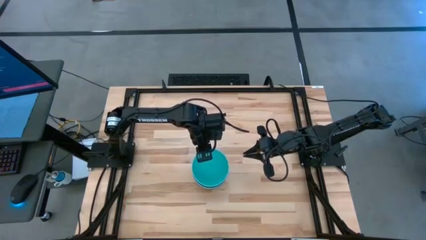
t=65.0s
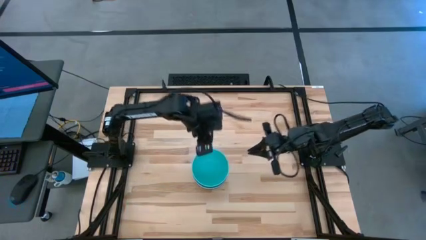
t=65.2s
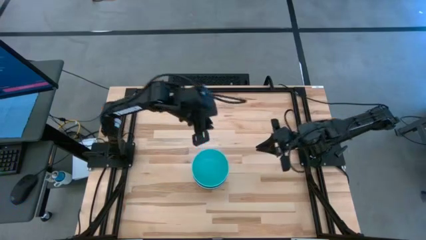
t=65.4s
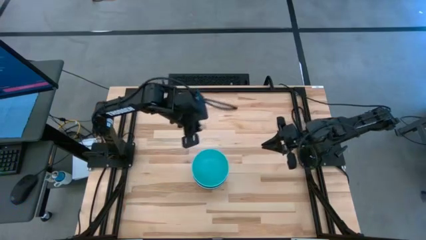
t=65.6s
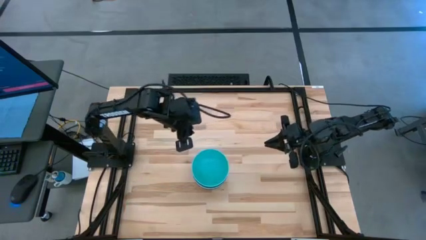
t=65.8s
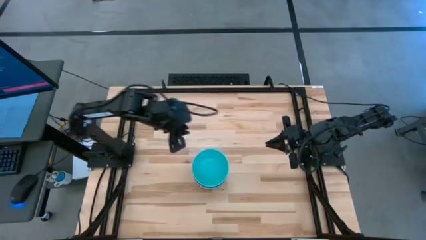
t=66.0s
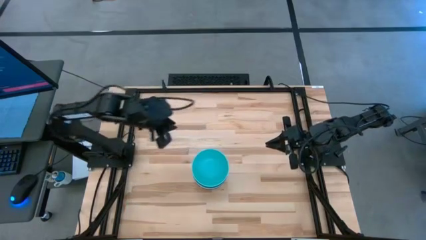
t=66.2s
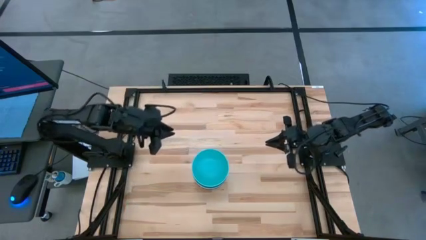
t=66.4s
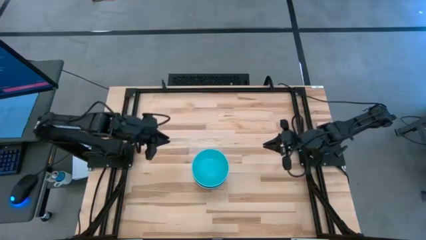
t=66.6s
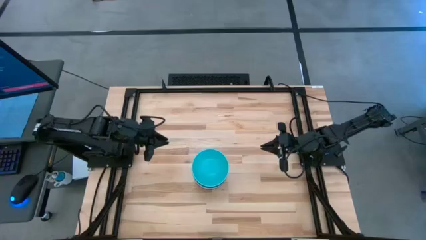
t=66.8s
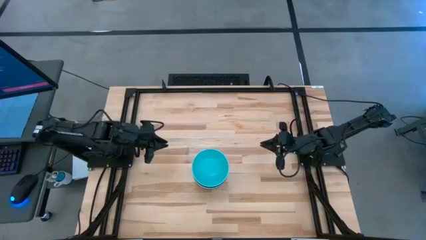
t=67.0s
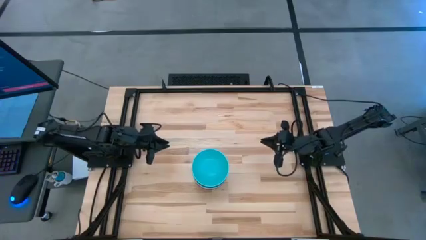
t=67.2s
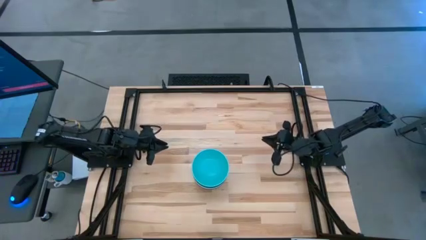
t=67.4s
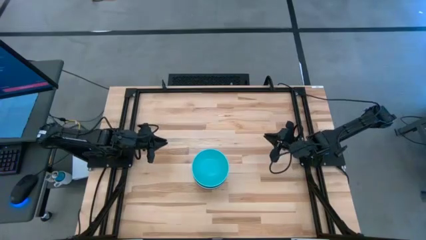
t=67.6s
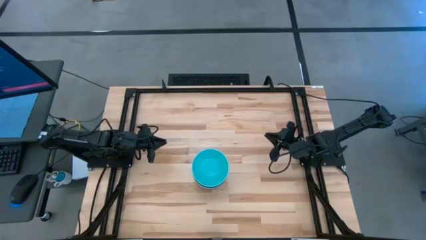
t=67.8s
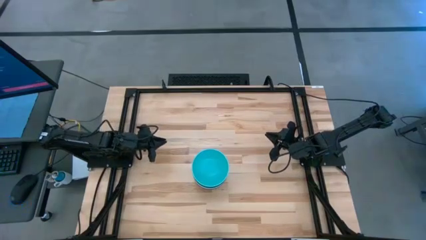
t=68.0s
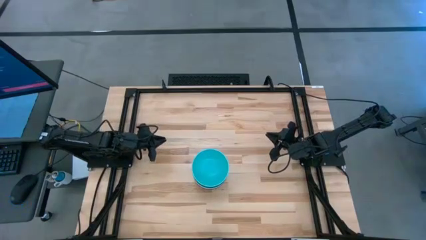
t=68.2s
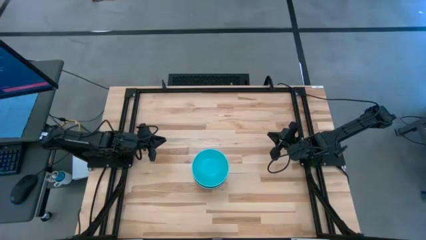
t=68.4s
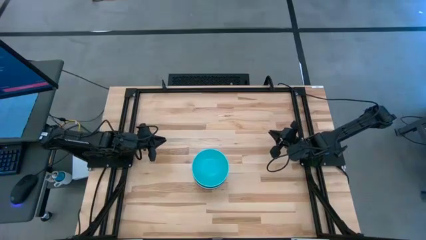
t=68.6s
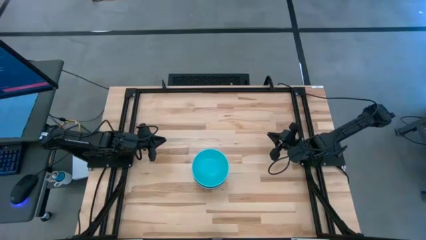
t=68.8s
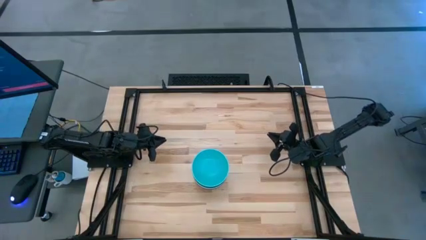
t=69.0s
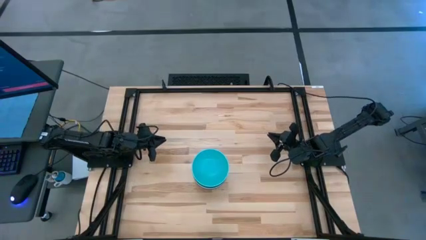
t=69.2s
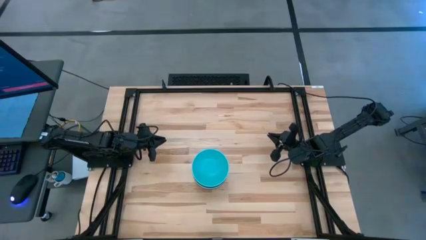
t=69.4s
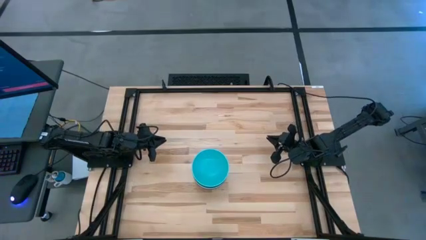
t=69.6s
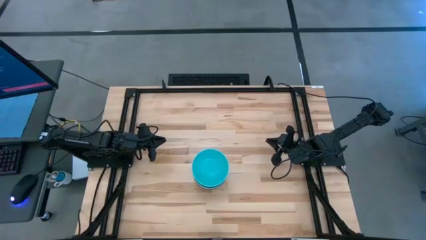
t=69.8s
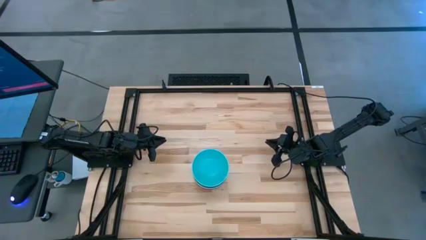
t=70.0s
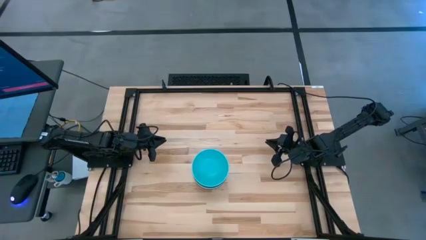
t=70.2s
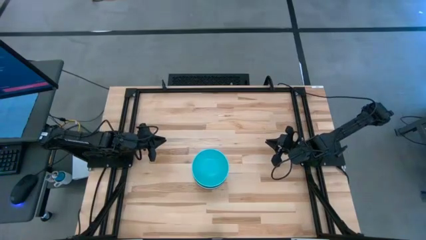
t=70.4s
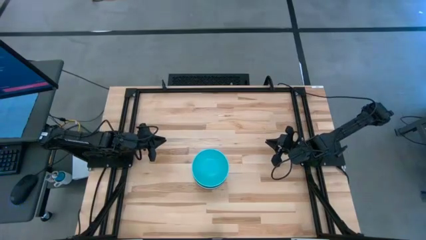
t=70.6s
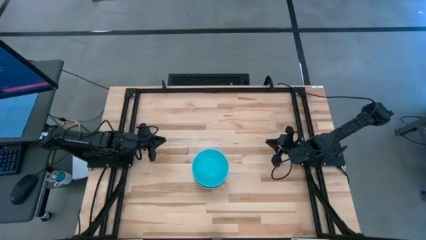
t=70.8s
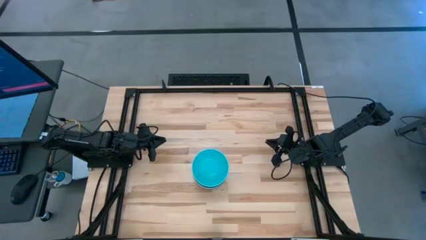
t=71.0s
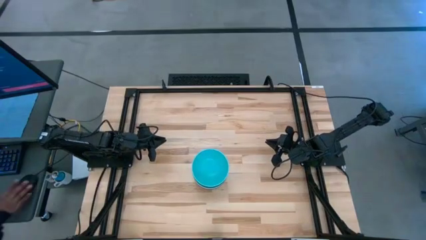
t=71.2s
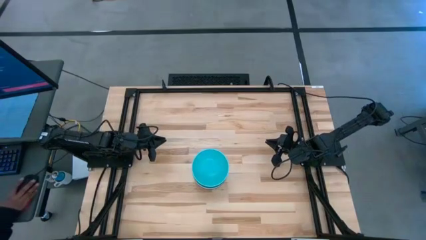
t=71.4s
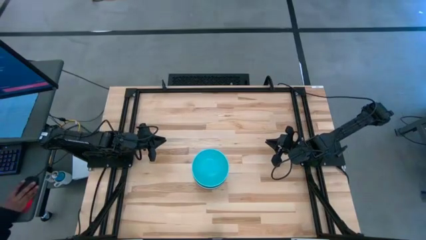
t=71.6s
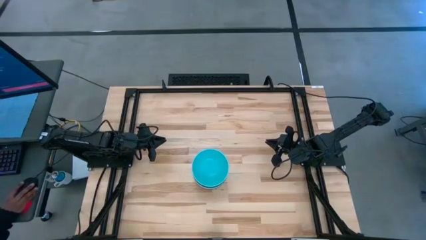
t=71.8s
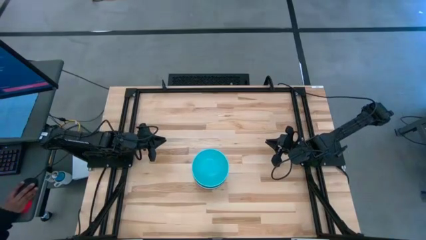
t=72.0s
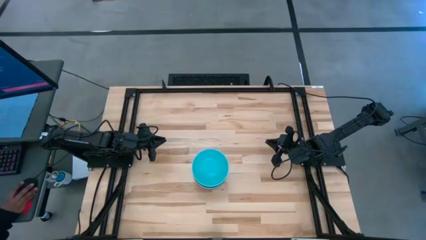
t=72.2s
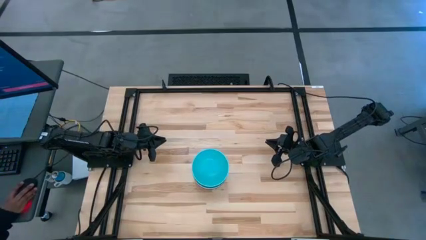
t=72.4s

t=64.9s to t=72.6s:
Task: Nest bowls inside each other
Return to Home Position

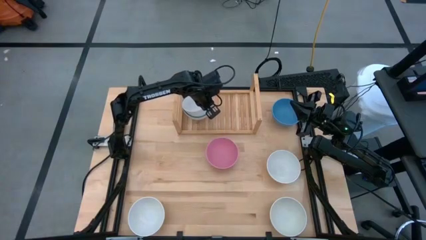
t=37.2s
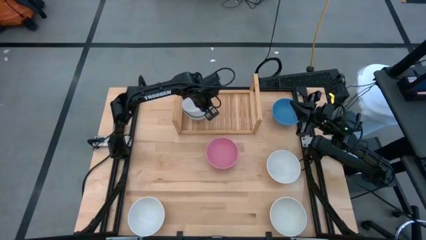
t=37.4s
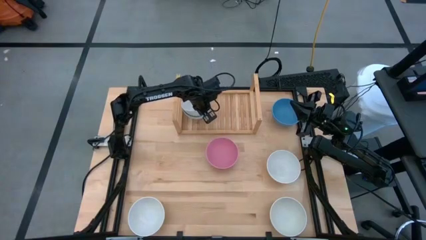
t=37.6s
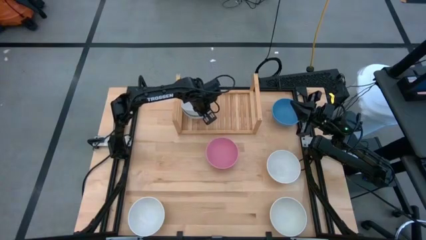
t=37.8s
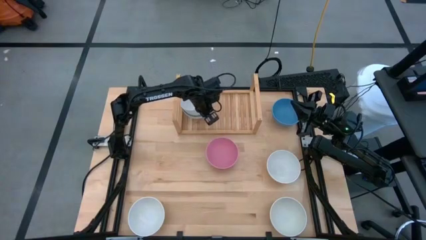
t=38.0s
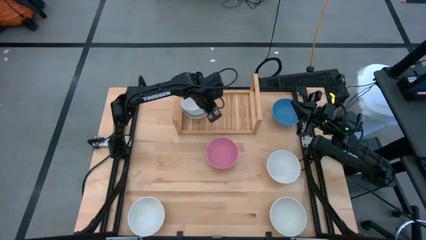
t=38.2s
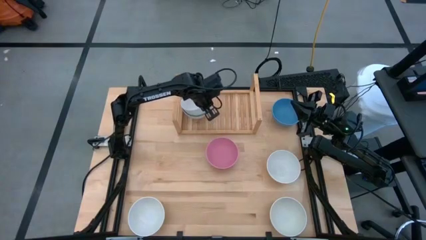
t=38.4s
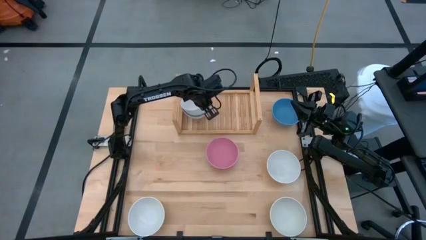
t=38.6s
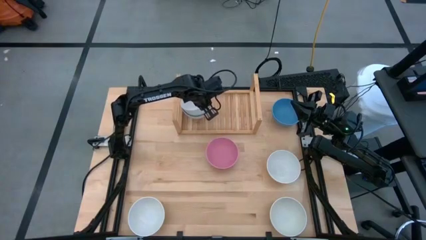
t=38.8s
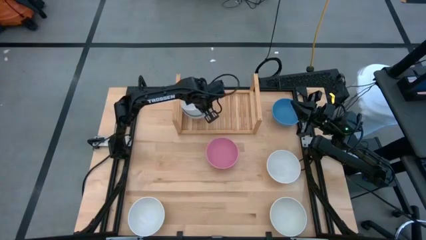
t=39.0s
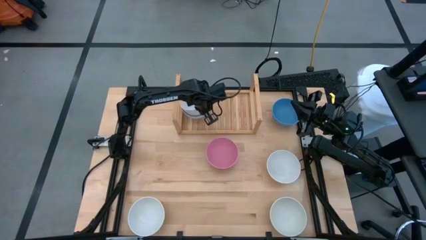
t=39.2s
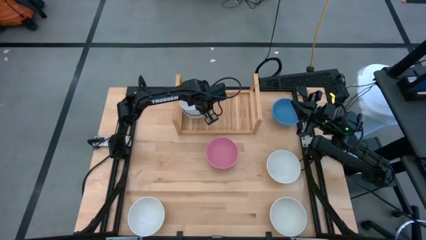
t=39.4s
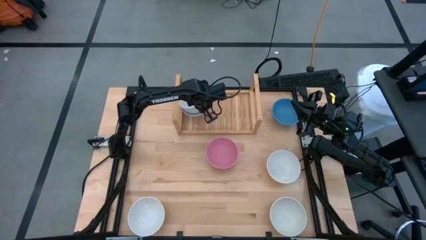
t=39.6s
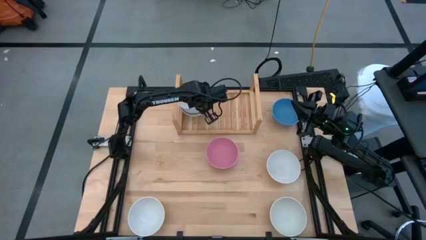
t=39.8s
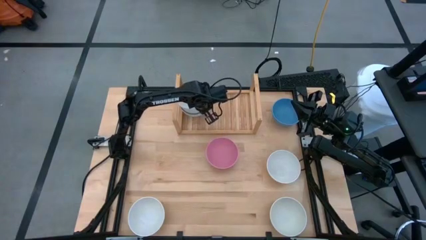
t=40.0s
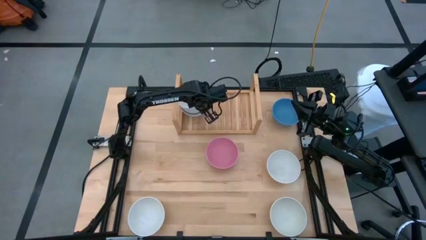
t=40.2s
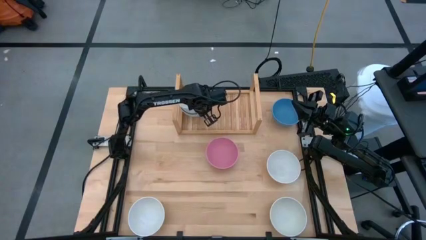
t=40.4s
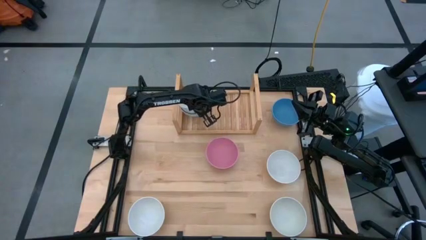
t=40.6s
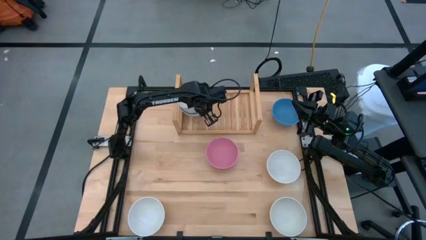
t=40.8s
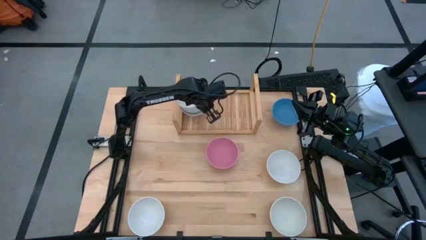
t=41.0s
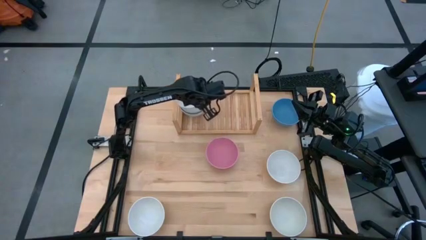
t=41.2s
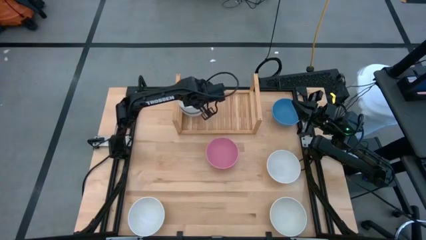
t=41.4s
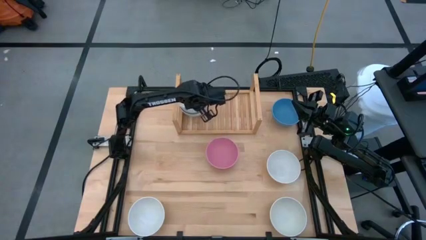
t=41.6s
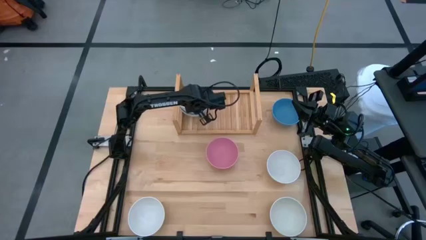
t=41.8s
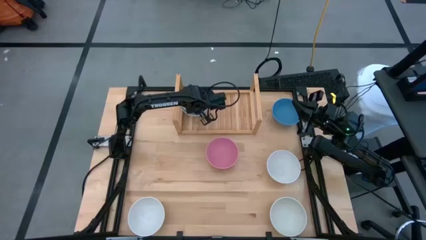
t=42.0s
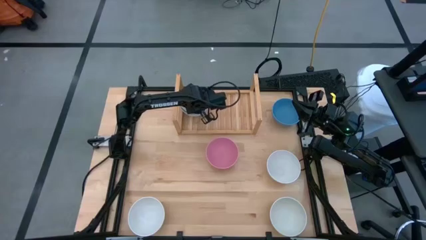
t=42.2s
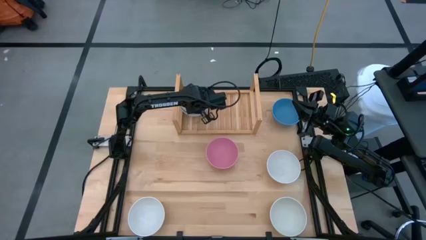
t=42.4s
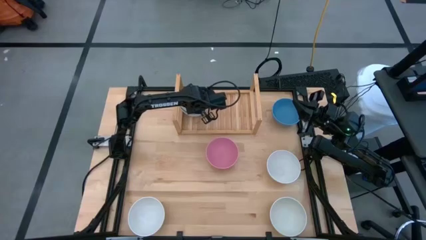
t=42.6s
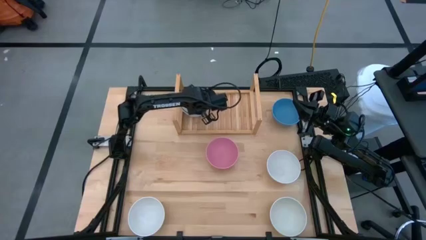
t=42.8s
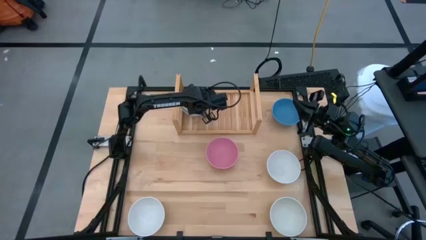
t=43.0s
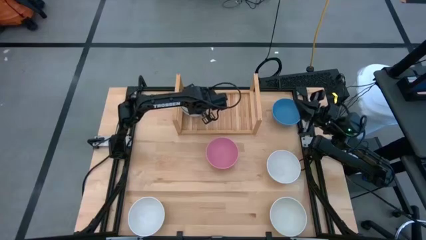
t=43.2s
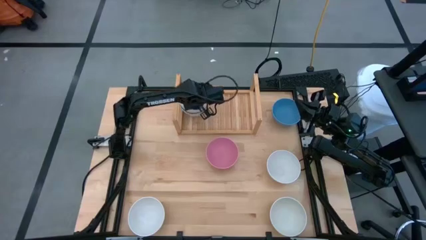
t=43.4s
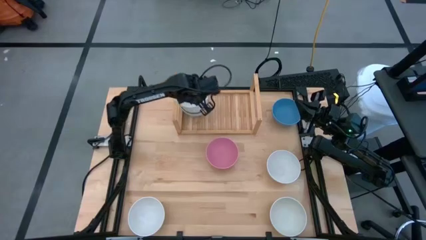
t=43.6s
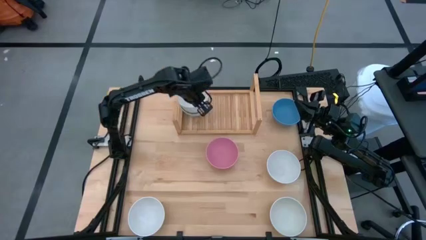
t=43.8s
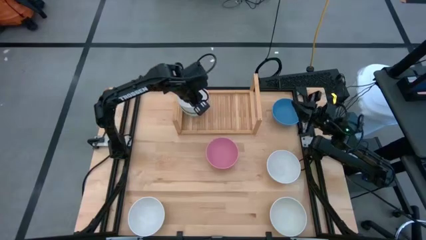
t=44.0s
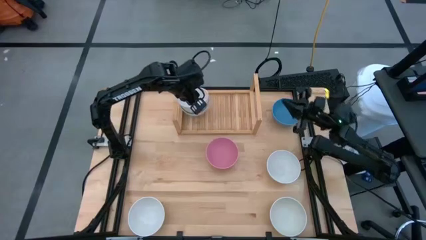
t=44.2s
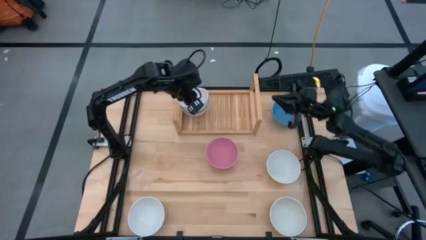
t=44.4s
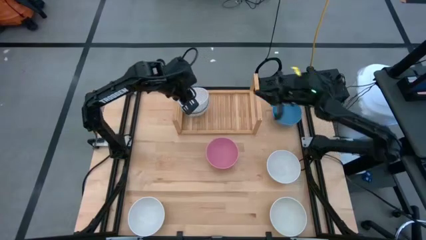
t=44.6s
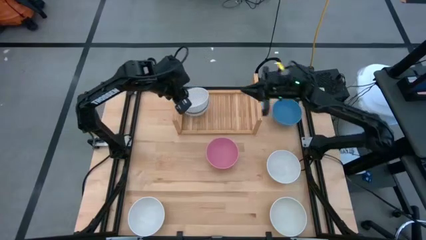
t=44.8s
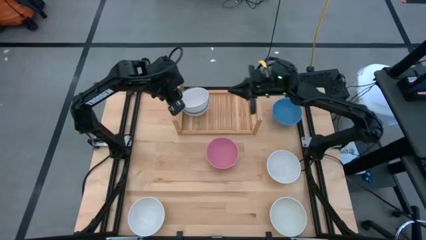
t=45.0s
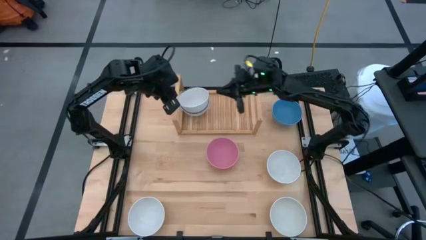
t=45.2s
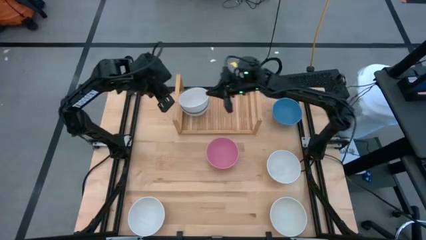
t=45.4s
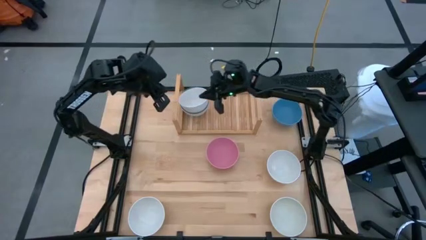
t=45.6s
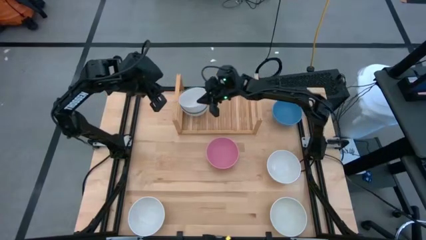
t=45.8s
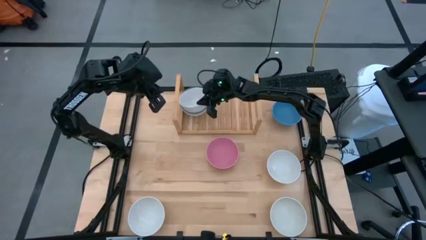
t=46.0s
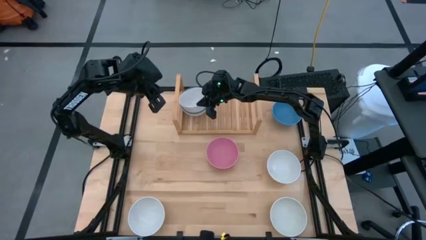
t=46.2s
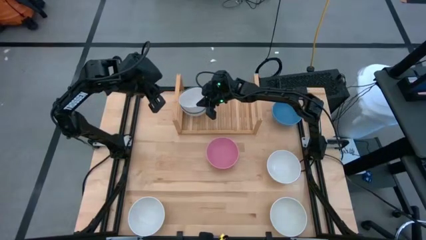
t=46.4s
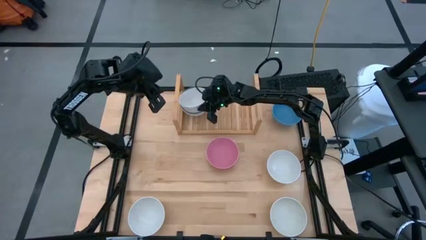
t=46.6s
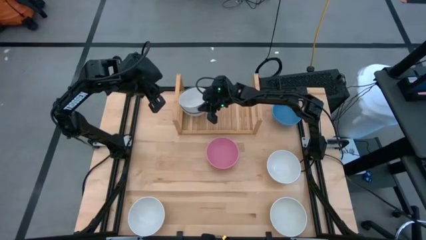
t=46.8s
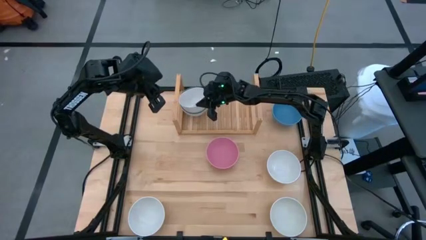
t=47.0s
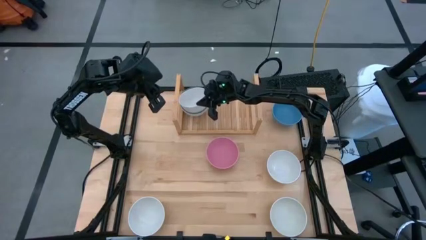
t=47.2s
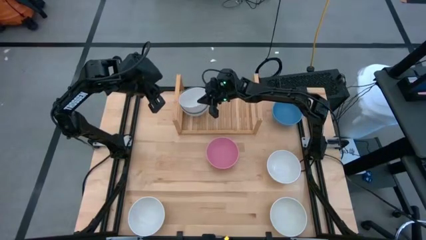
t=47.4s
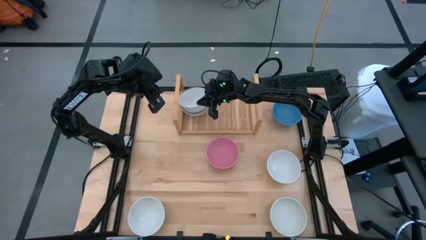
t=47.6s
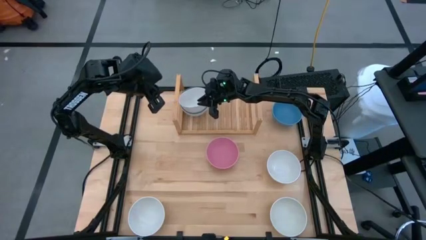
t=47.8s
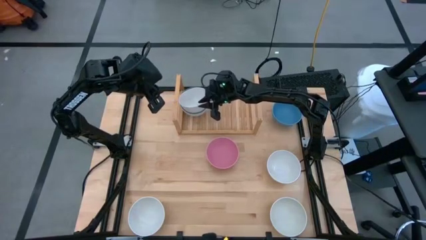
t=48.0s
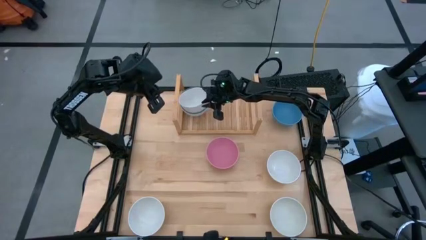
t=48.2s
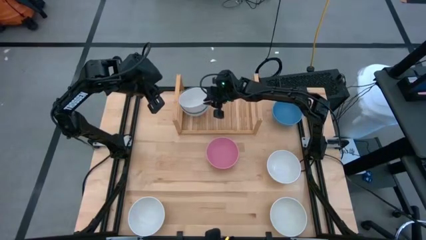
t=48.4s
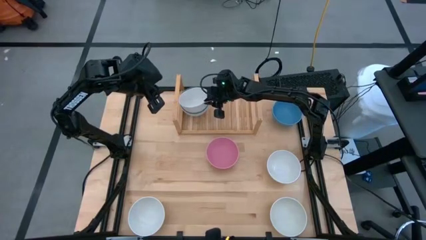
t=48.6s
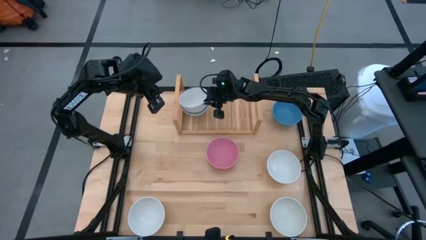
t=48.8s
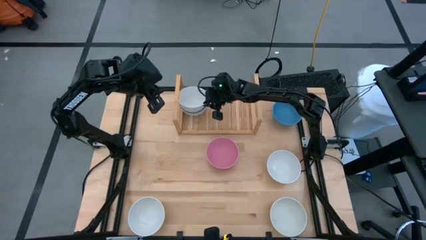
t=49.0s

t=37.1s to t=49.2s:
Task: Place and stack bowls onto a shelf
Stack the white bowl on top of the green bowl on the shelf
